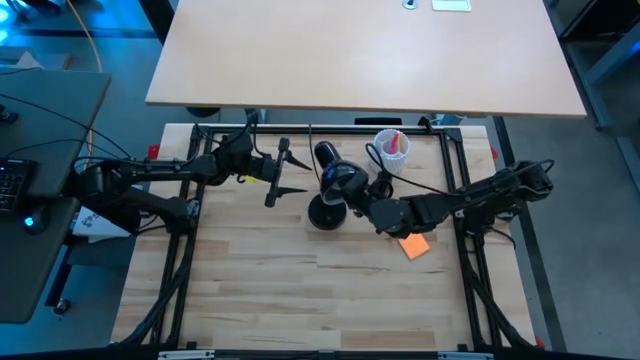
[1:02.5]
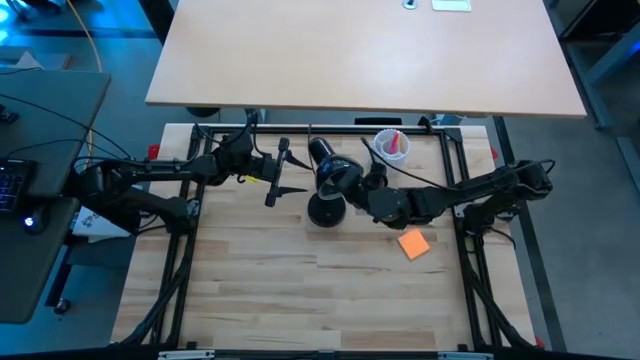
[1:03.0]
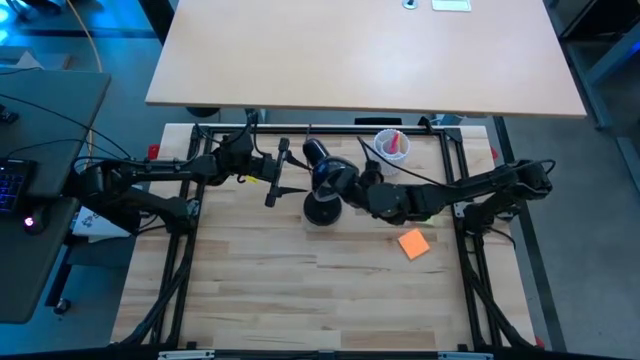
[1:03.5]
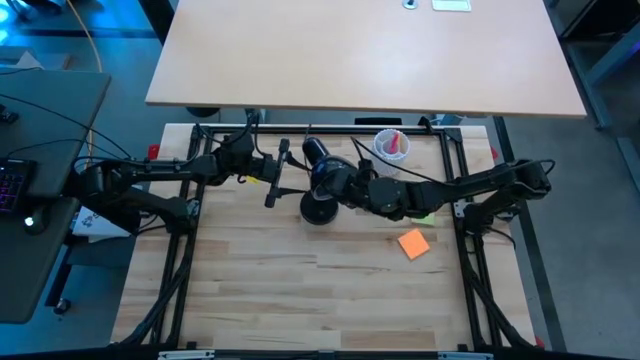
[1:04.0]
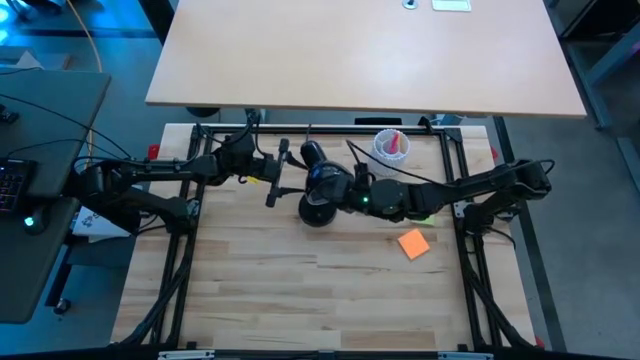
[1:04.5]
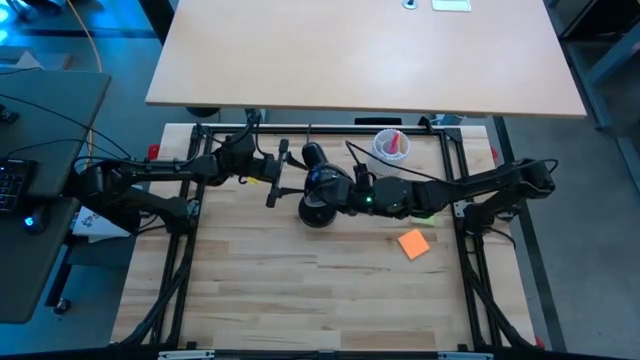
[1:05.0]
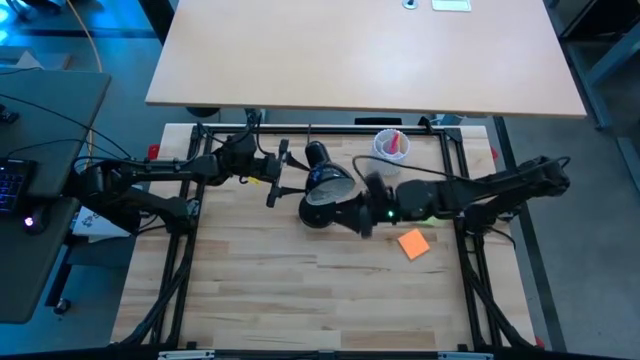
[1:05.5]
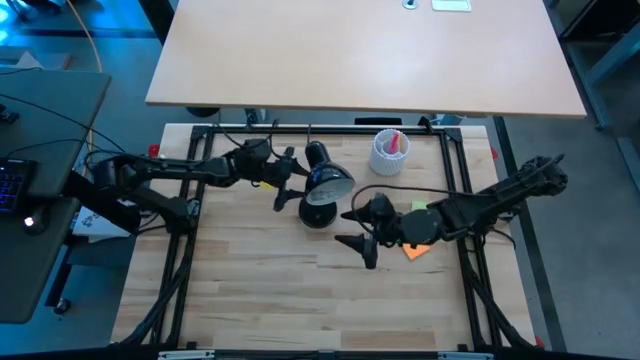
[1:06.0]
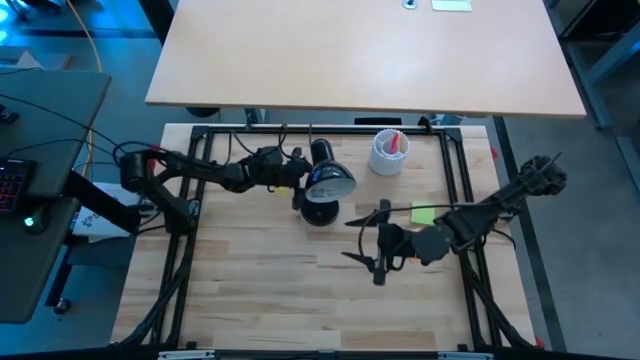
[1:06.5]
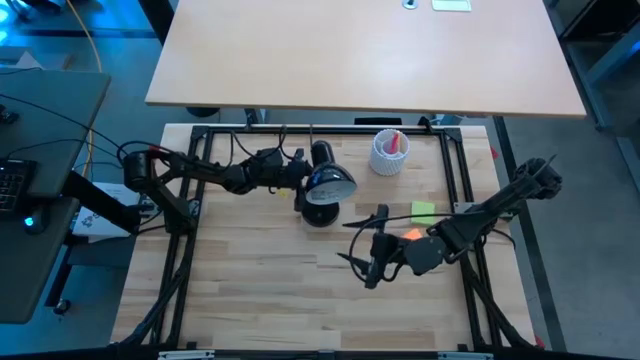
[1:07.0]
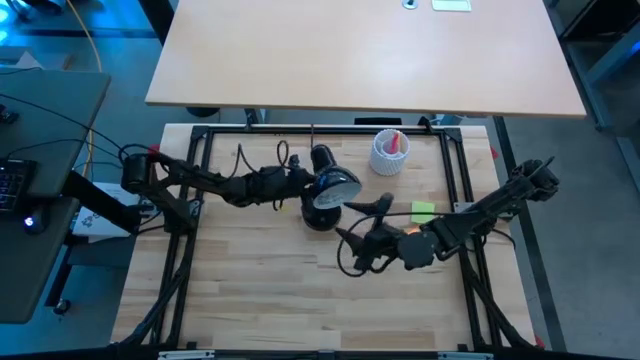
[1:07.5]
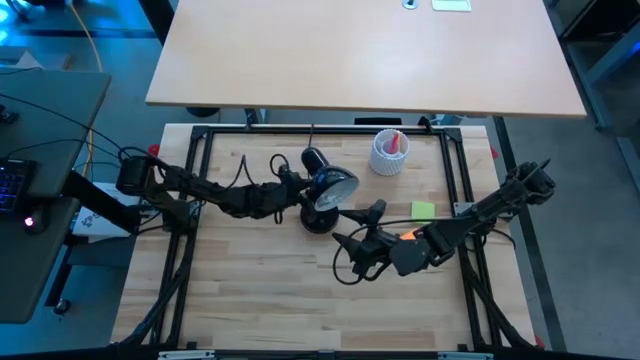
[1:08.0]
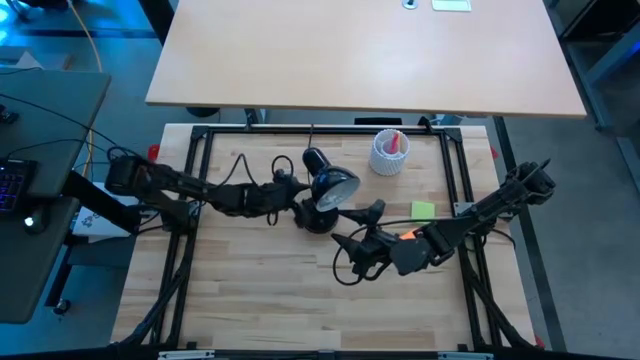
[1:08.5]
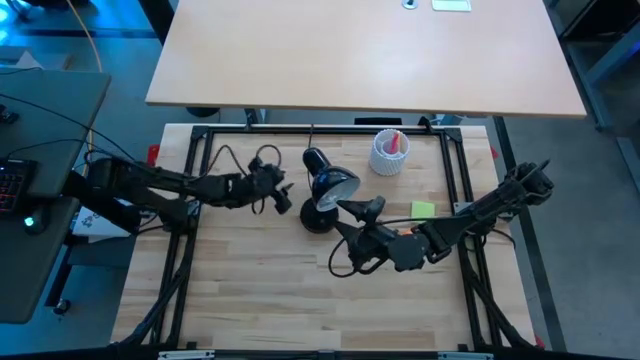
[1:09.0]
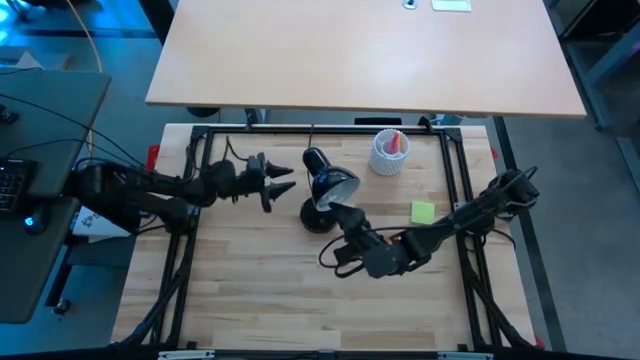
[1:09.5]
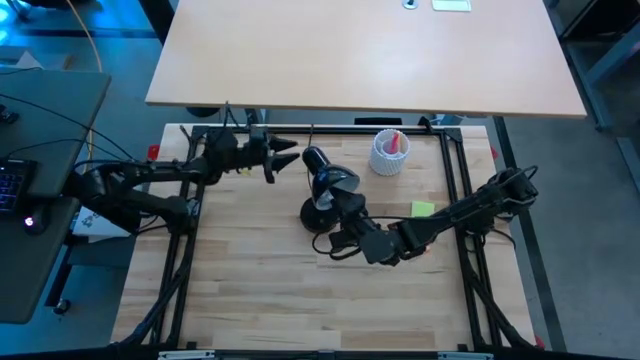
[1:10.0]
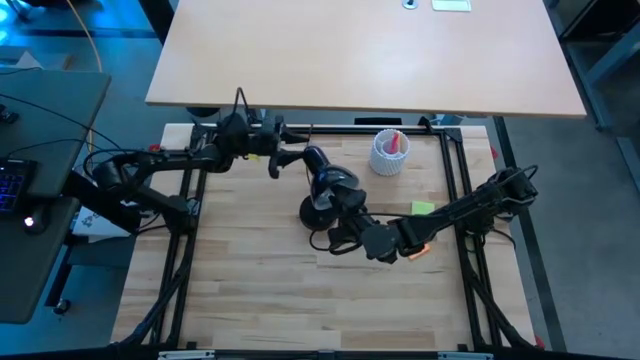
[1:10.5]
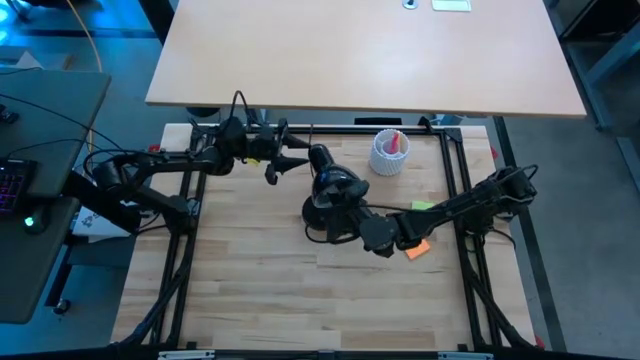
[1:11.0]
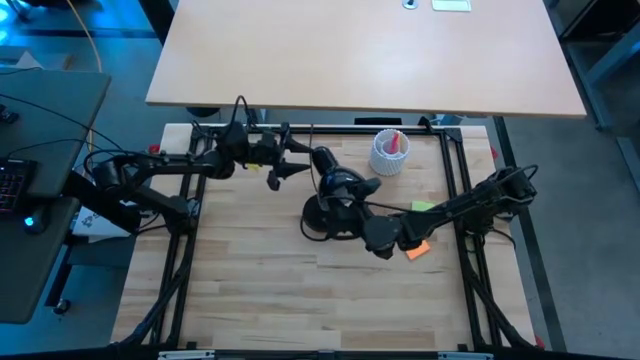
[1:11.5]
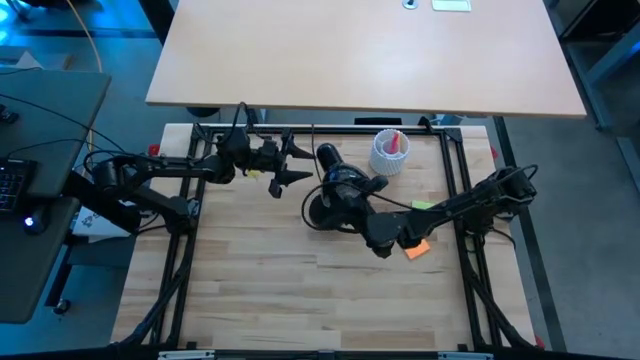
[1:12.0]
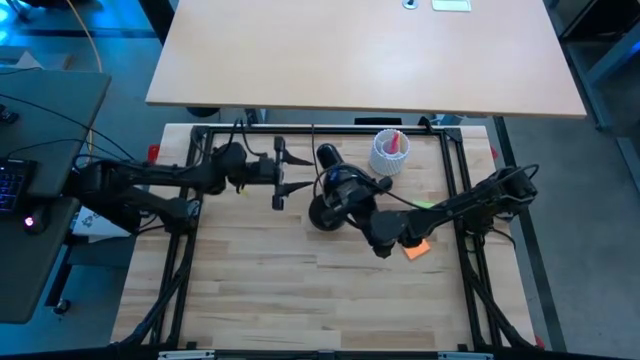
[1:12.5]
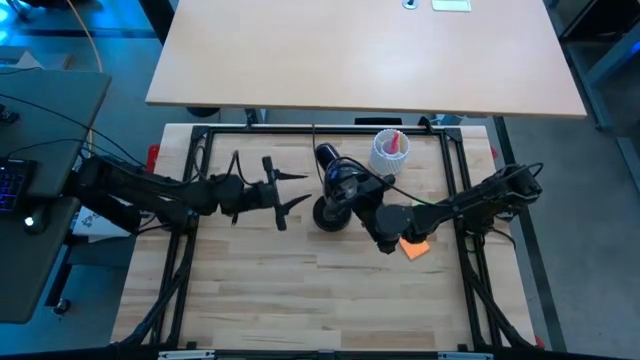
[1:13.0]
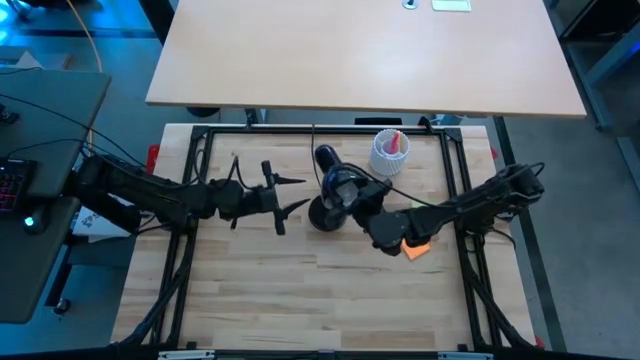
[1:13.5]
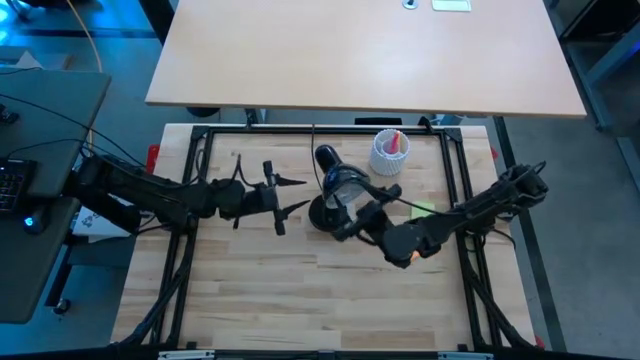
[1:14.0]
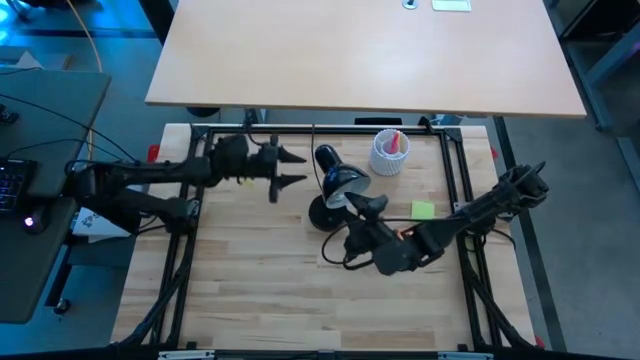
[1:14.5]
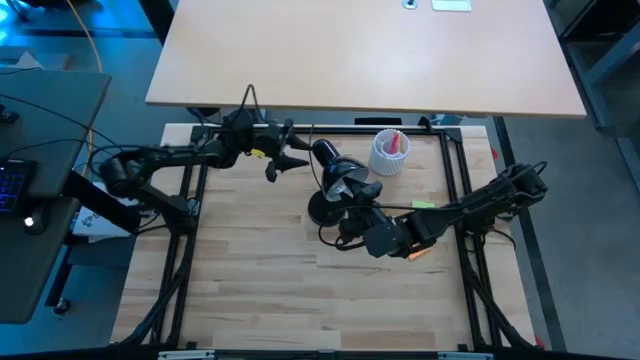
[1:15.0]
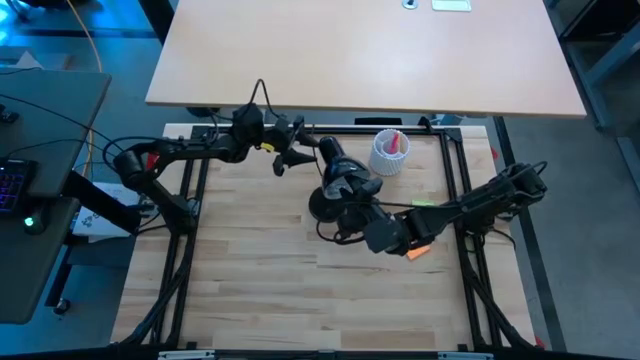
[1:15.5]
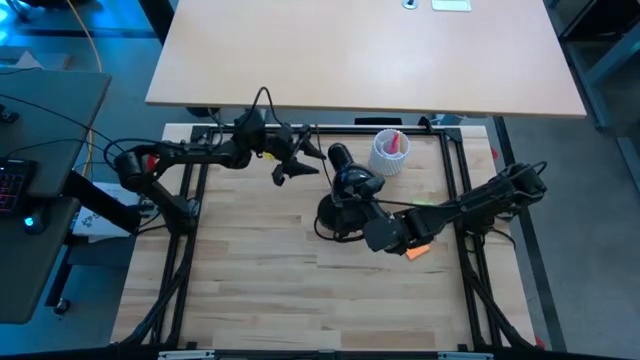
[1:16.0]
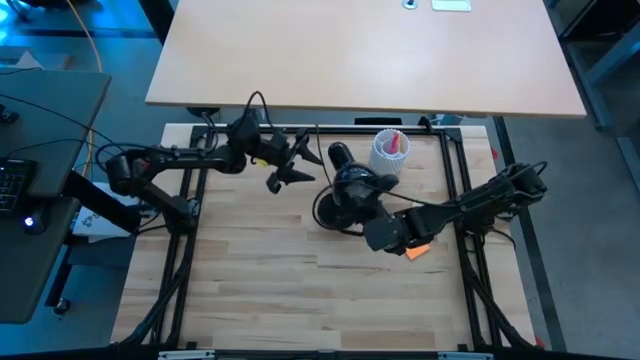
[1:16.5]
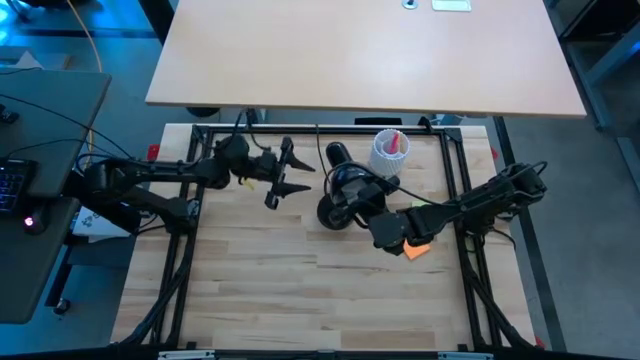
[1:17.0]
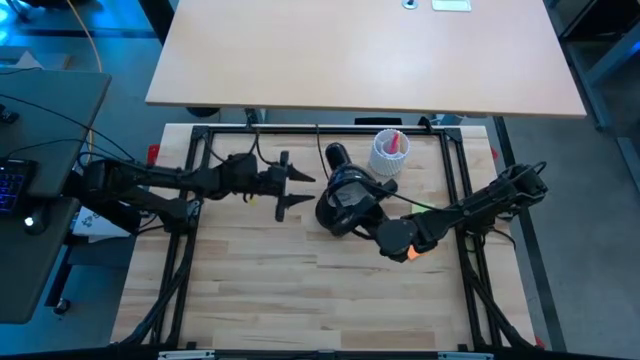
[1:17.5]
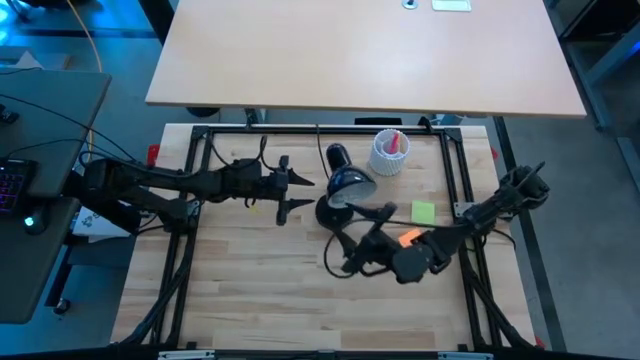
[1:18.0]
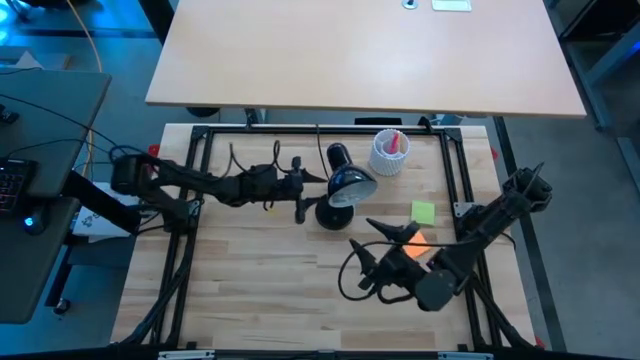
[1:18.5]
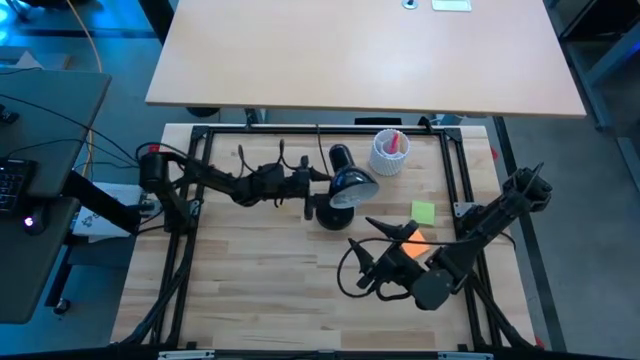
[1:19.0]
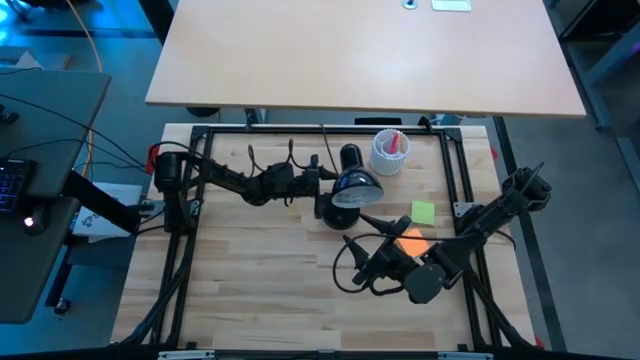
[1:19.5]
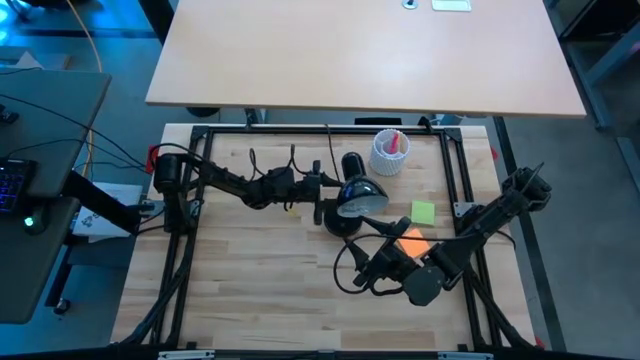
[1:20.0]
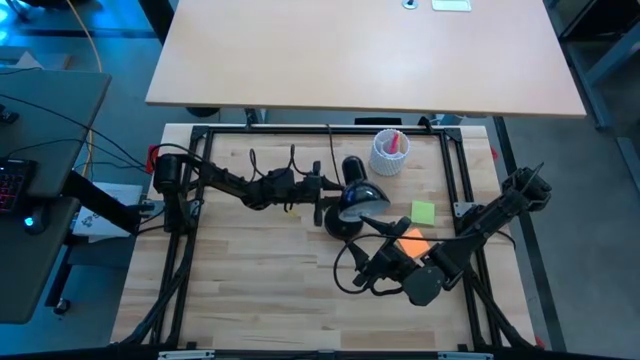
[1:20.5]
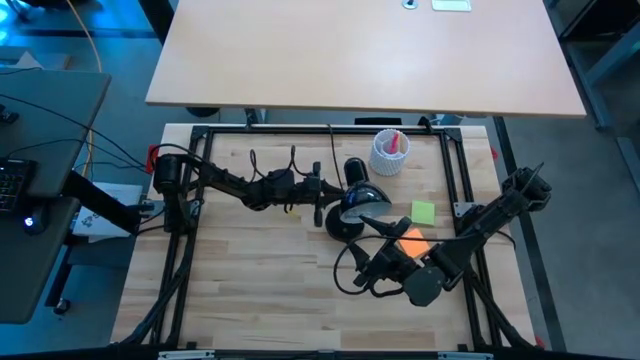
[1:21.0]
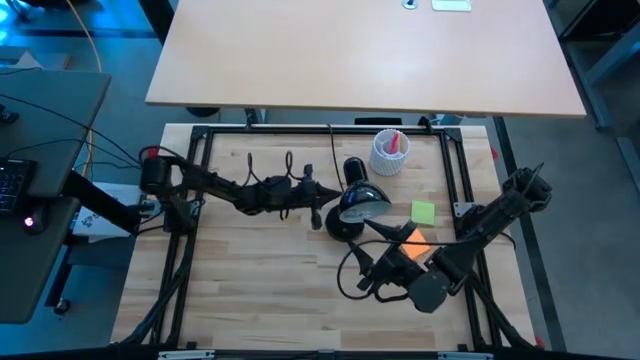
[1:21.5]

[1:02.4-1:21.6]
Task: Screw lightbulb
Insert the lightbulb into the desk lamp

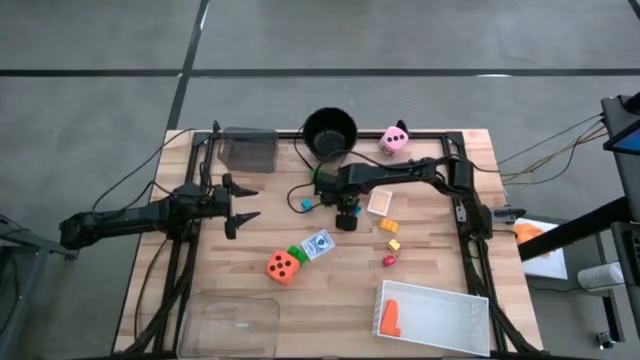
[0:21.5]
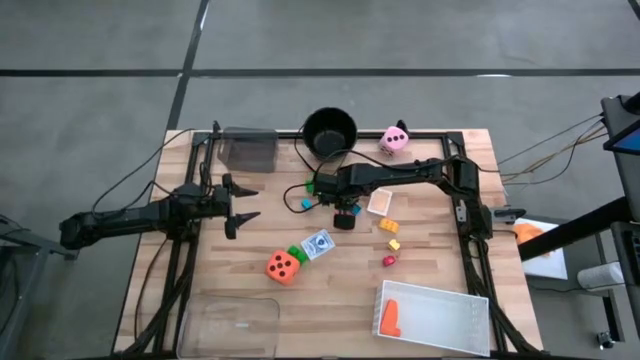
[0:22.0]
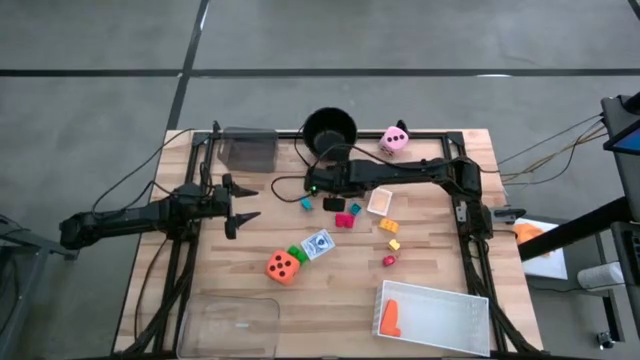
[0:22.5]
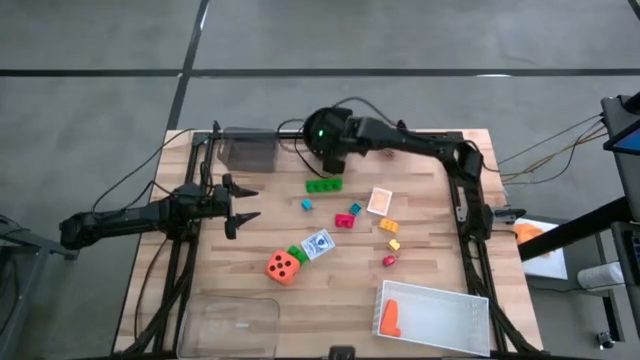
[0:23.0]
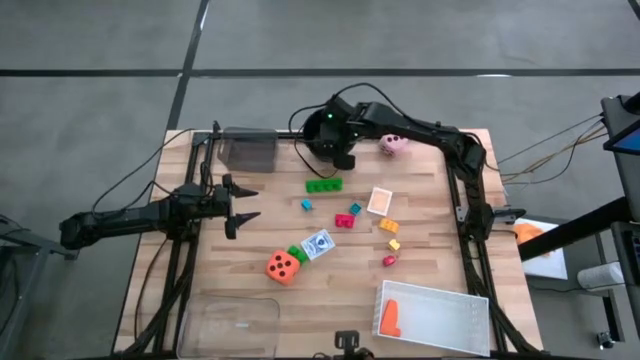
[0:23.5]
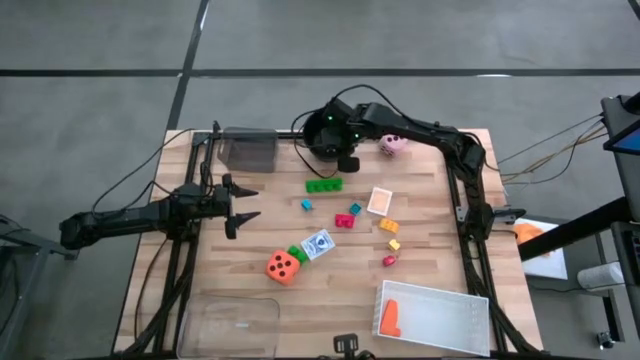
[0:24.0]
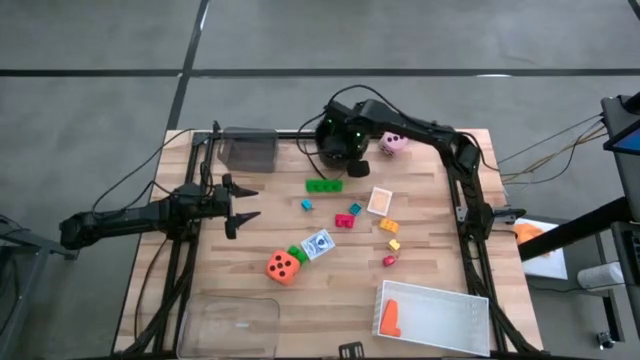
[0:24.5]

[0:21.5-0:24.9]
Task: Pick & Place Toys
Adjust the black bucket
